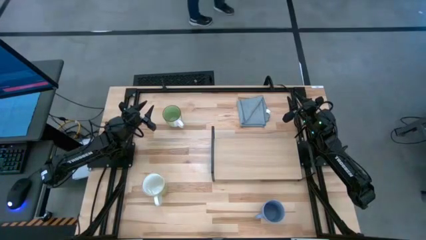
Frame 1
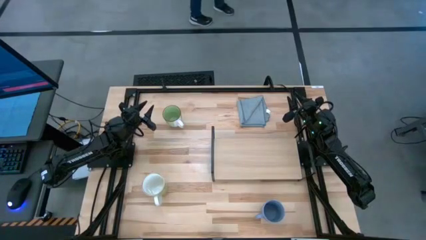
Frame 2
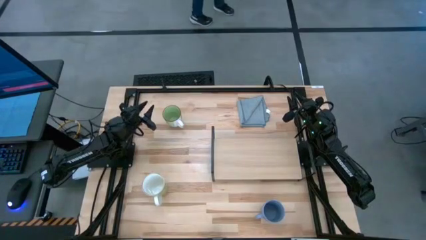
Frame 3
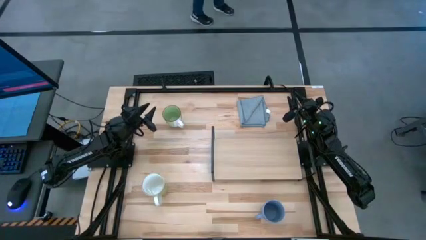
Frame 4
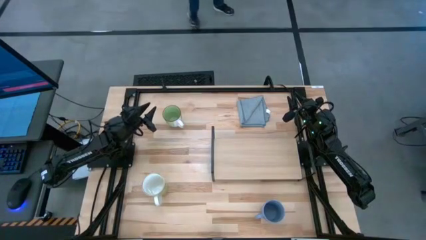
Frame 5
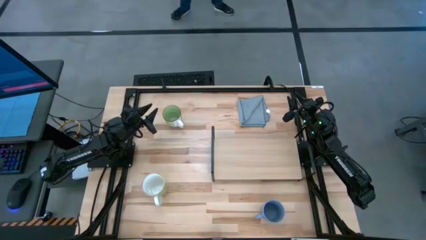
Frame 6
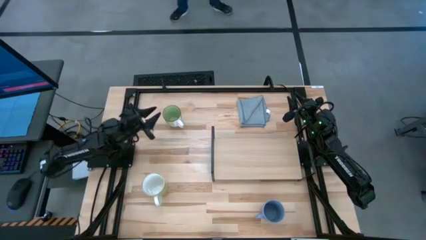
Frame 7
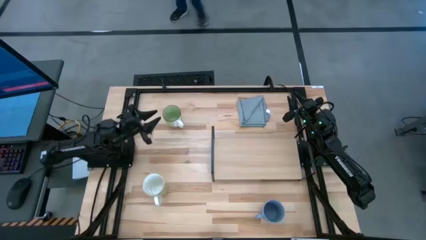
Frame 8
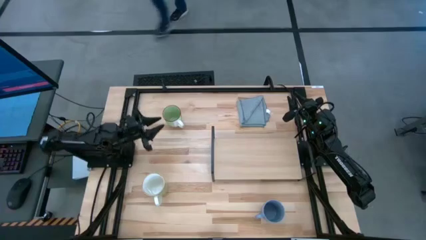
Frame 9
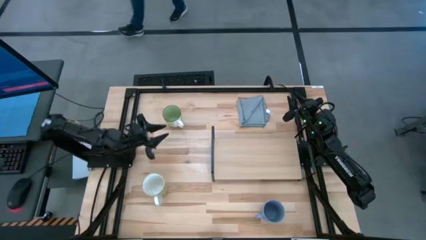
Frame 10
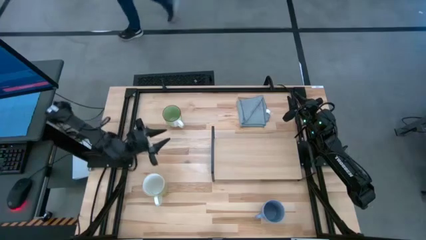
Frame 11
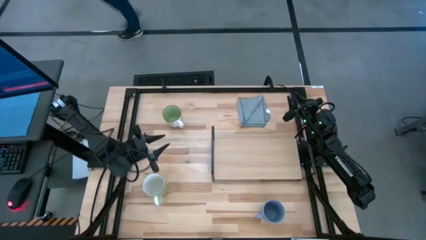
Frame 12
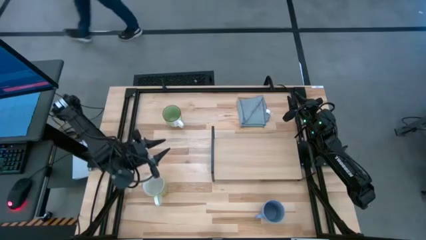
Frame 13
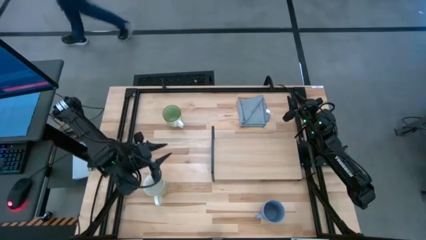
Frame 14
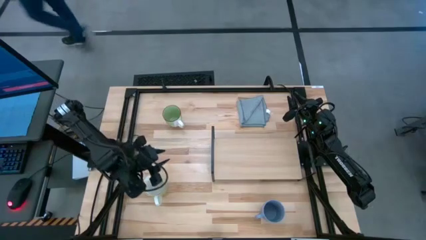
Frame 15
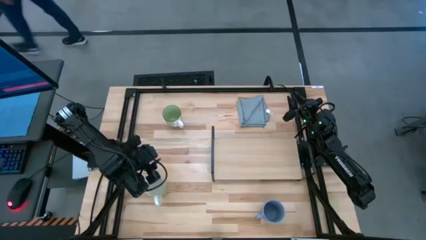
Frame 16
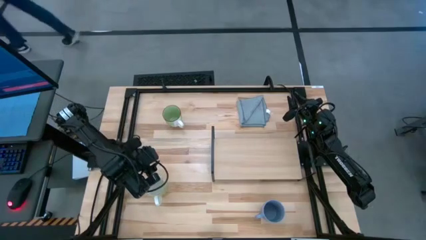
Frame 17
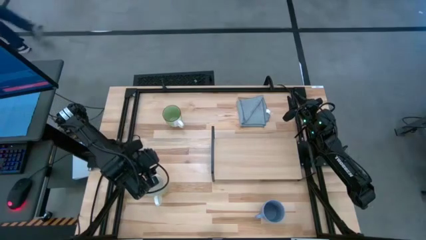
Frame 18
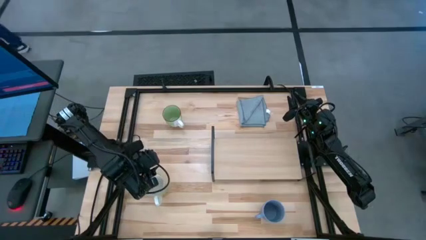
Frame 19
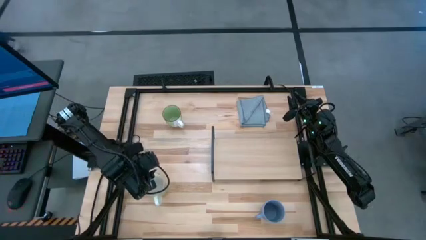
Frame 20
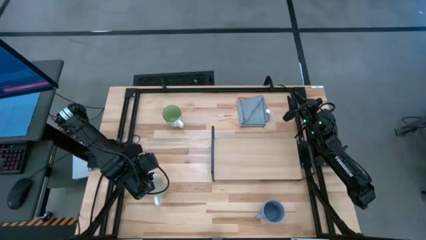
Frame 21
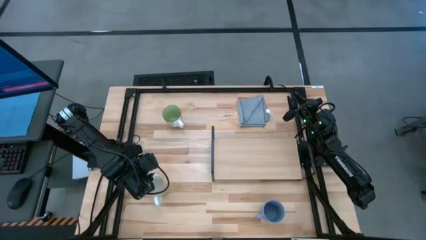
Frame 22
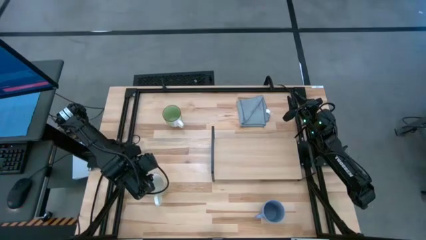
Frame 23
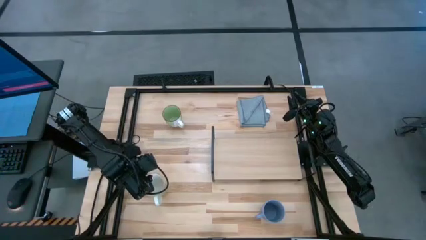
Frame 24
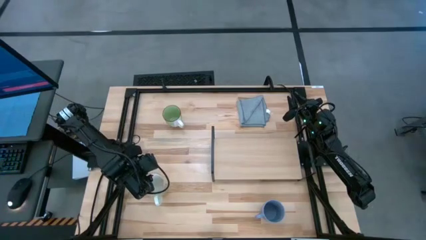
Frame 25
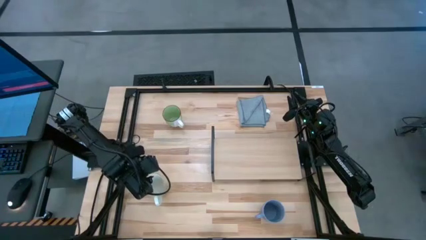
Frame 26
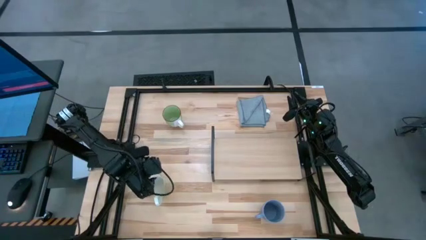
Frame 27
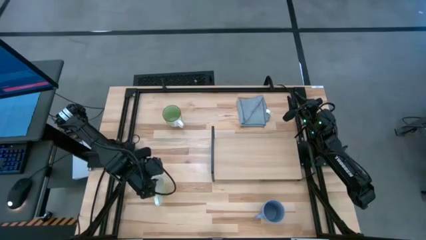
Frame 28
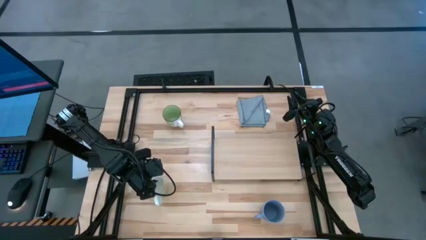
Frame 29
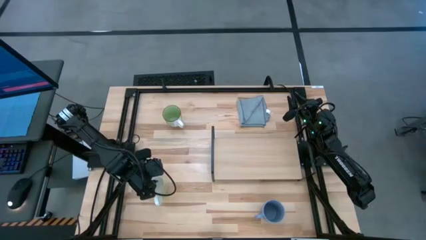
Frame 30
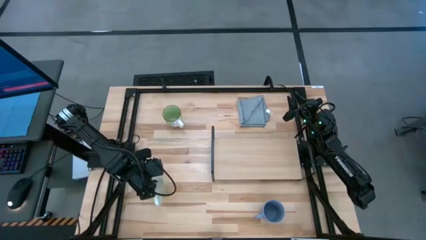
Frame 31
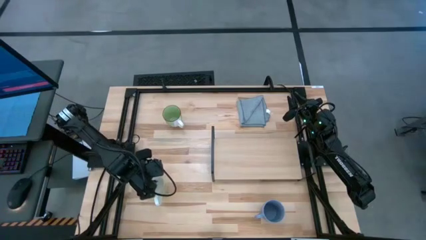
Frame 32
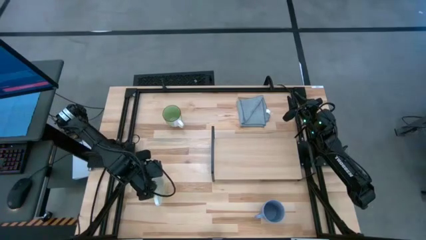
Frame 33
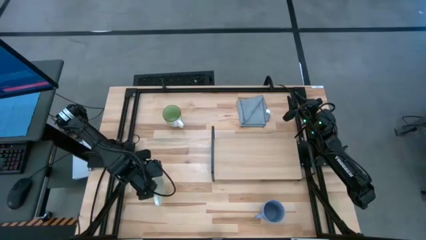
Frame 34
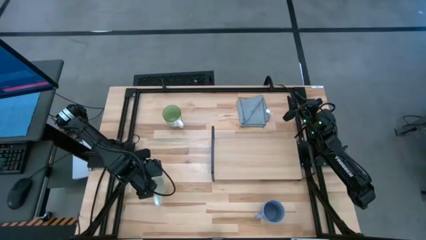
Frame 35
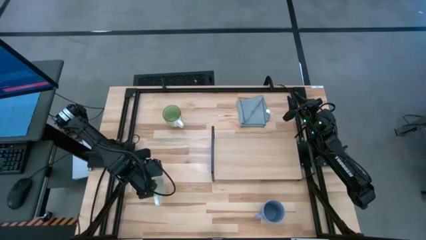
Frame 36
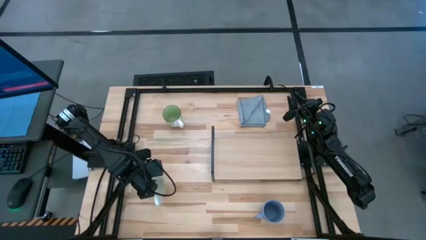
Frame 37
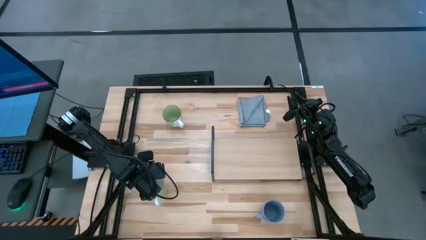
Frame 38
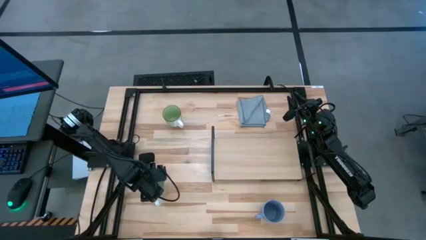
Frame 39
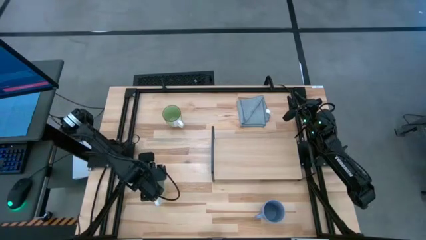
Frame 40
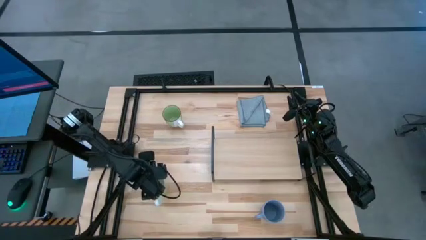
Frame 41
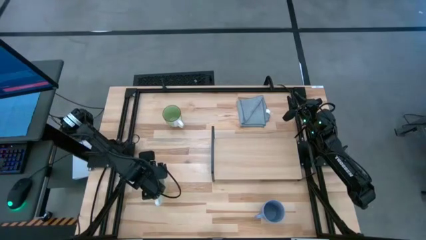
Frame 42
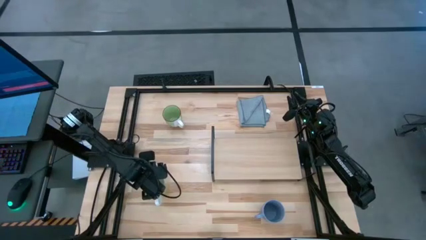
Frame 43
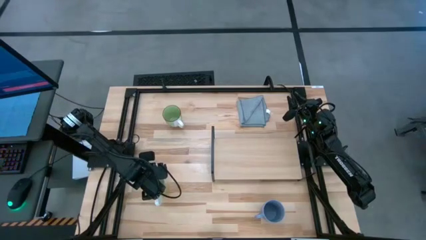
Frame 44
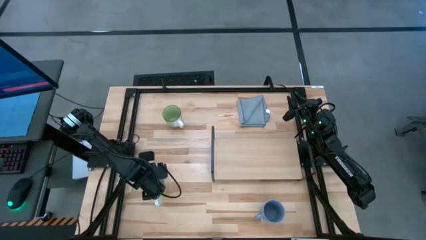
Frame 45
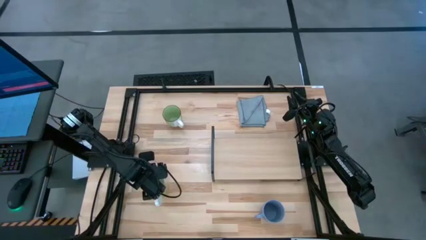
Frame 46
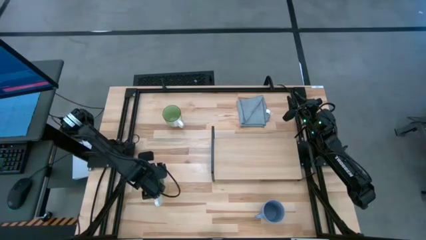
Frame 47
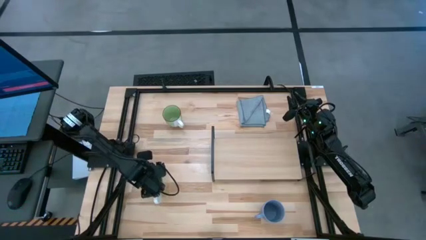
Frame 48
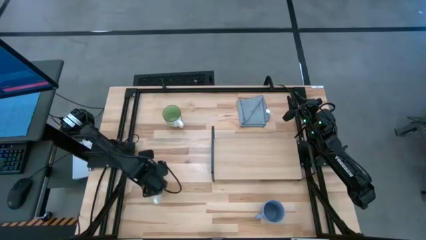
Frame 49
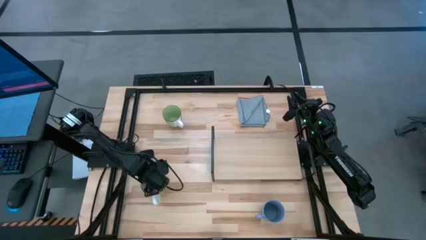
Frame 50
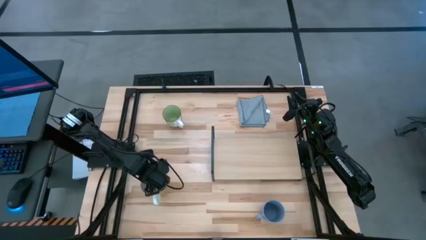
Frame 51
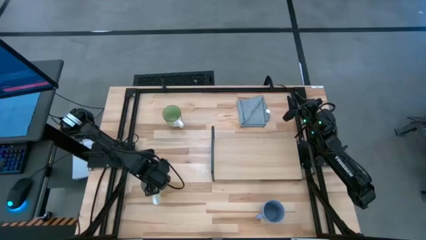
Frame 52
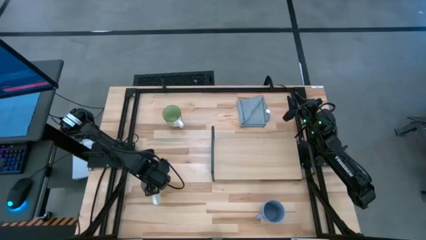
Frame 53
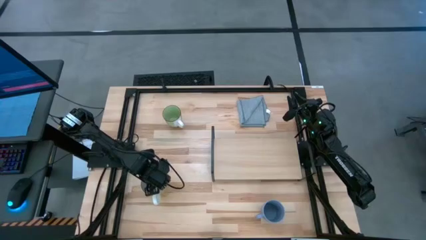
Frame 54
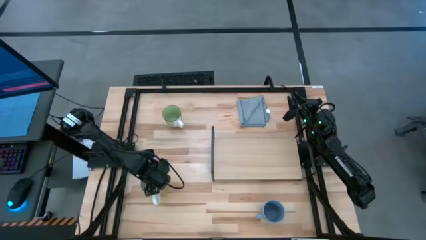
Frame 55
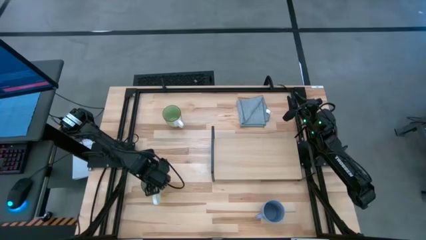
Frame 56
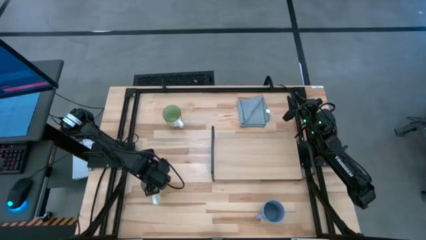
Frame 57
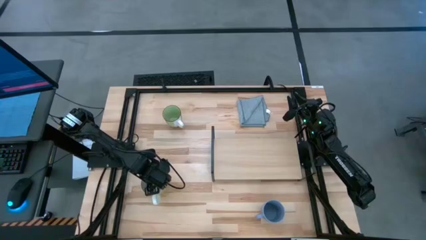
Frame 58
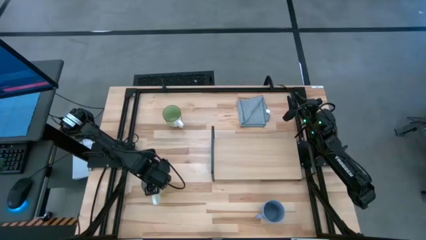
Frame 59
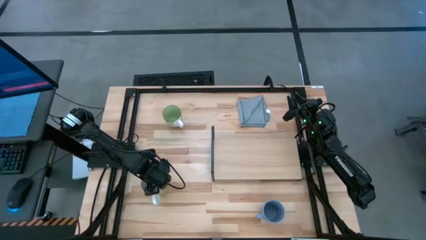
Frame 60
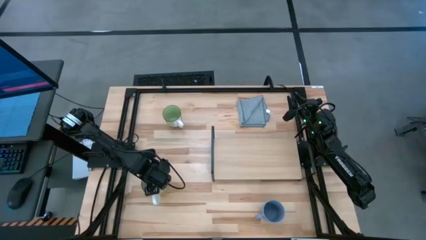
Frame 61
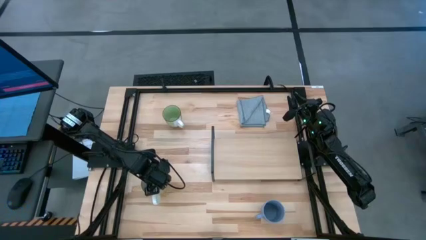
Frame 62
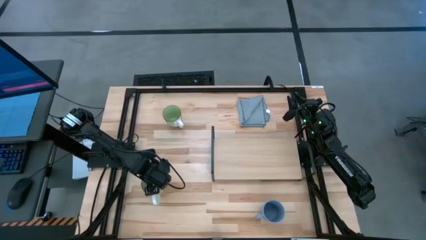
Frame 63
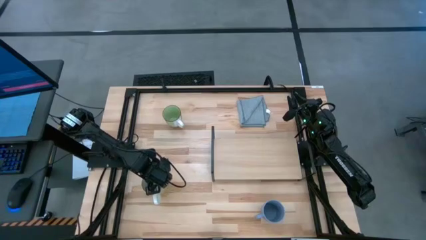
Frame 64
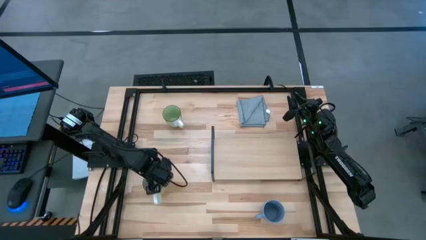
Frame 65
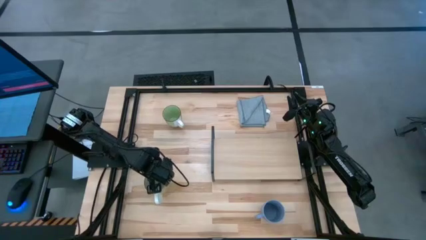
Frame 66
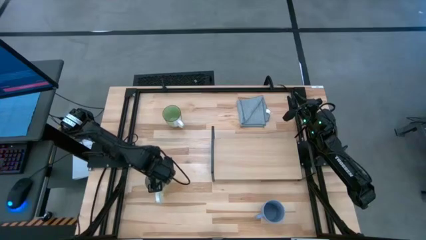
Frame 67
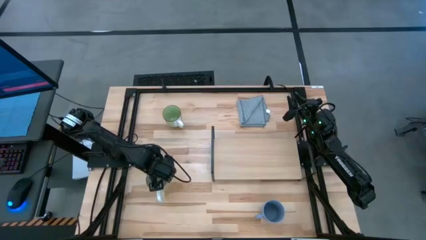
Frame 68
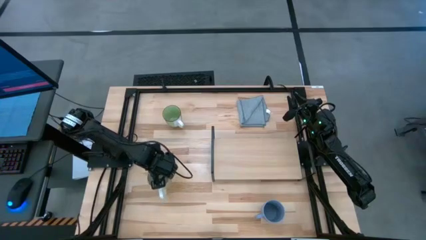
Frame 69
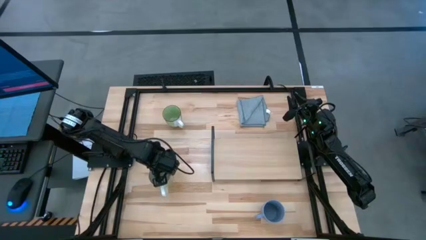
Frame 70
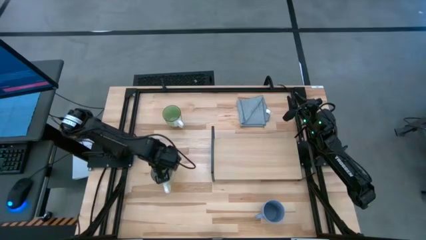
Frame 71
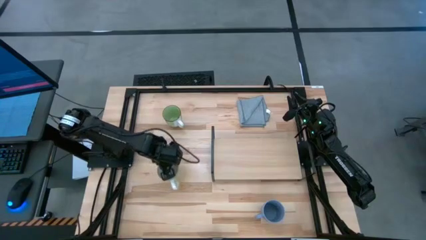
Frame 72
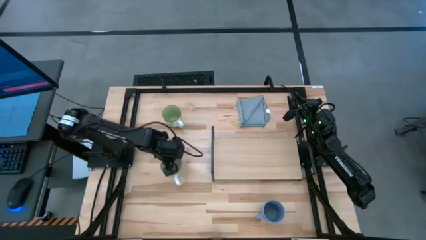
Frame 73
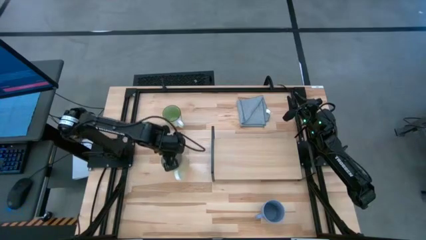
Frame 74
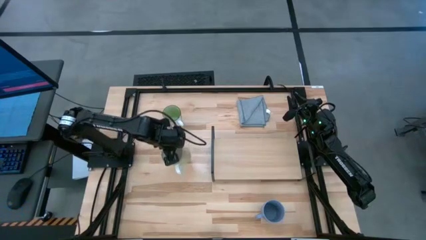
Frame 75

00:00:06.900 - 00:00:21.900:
Task: Stack small to large cups/mugs on shelf
Put the light green mug on the shelf
